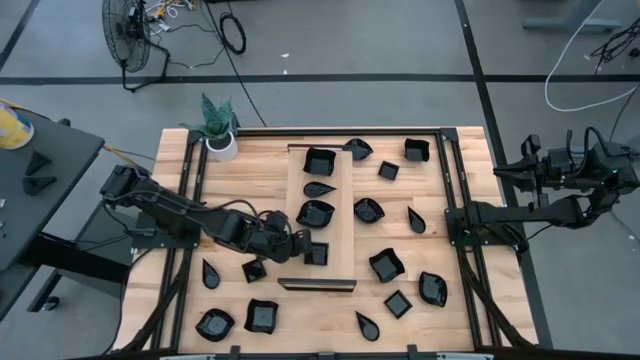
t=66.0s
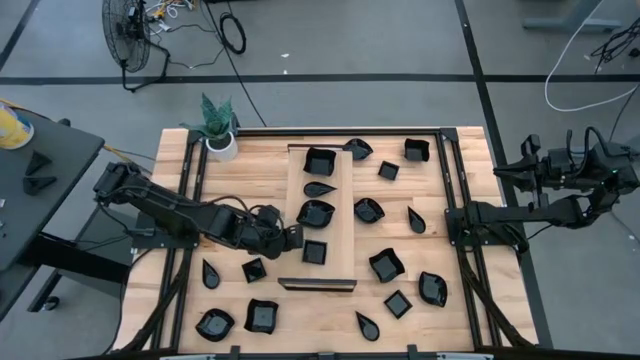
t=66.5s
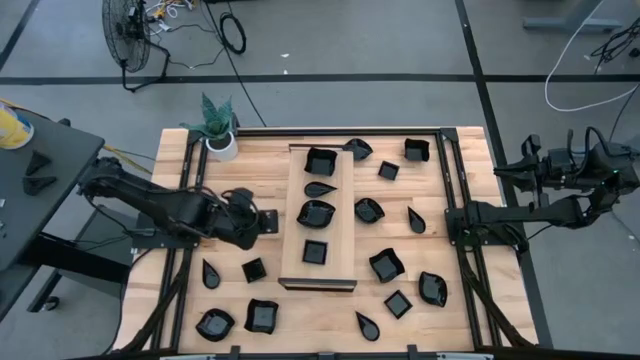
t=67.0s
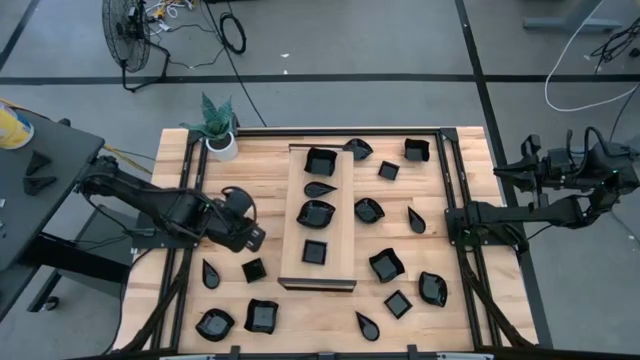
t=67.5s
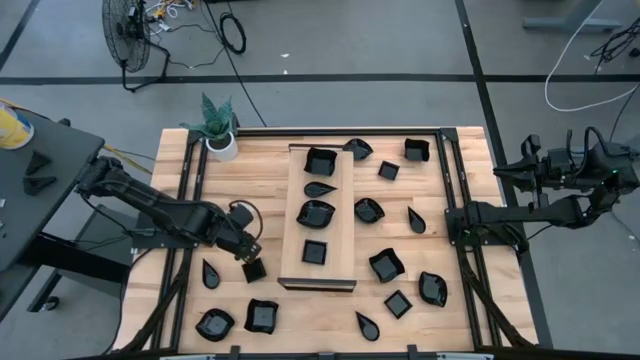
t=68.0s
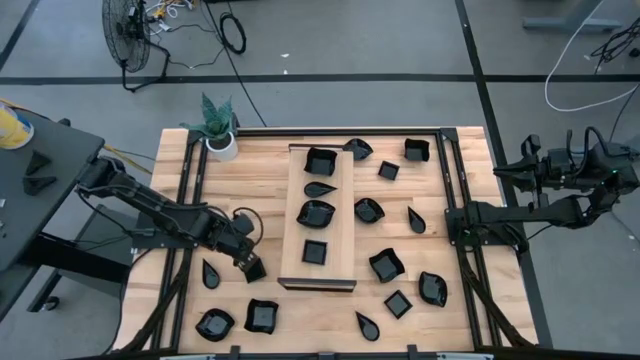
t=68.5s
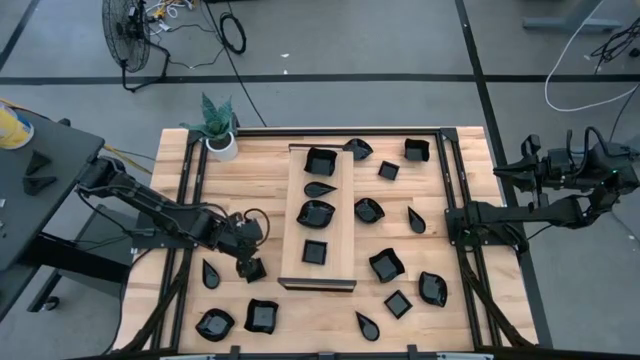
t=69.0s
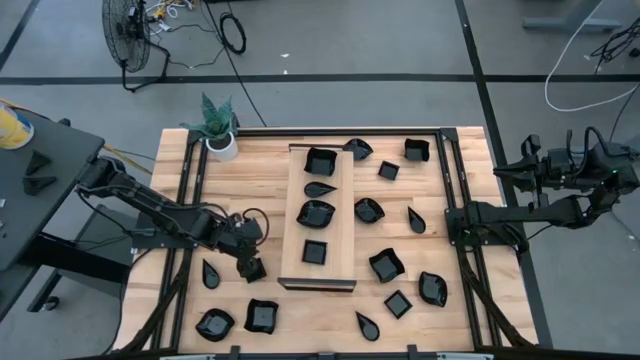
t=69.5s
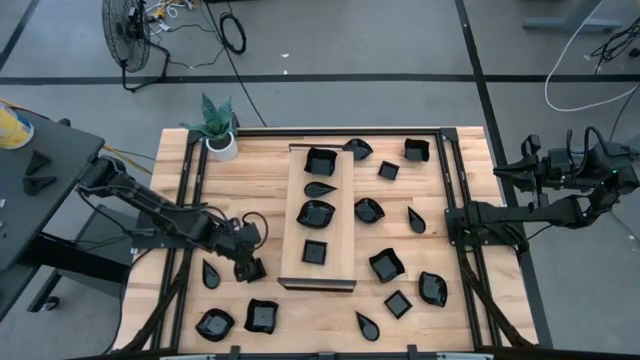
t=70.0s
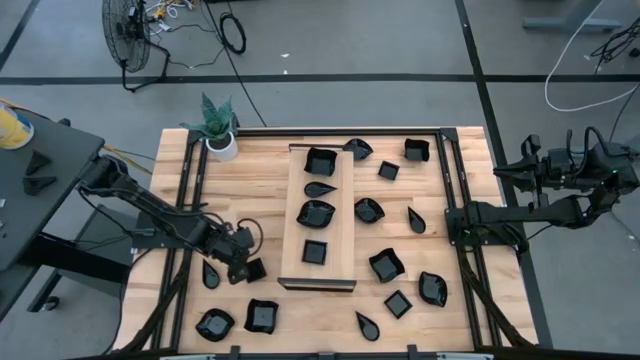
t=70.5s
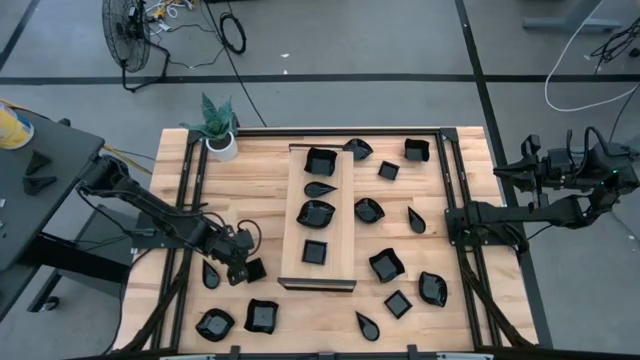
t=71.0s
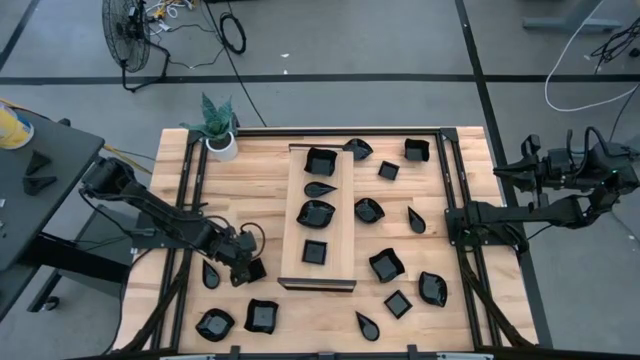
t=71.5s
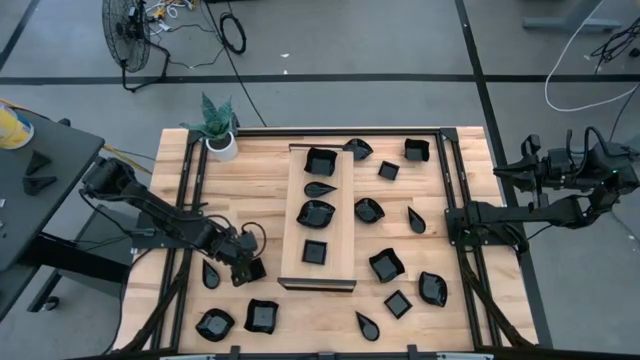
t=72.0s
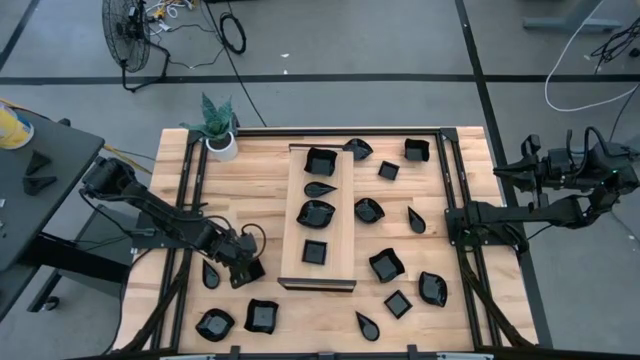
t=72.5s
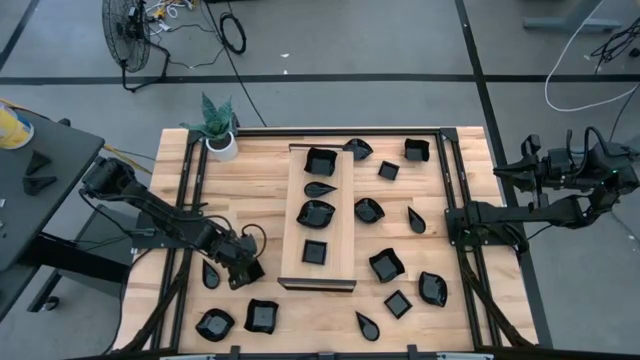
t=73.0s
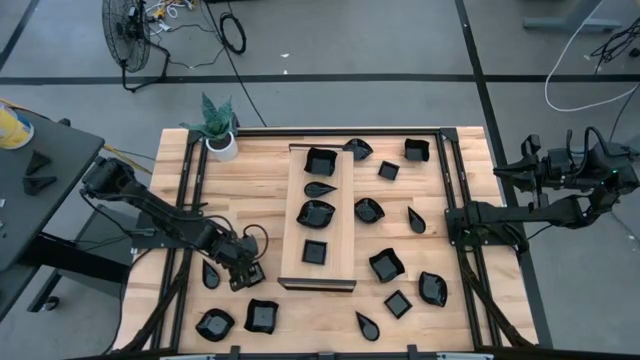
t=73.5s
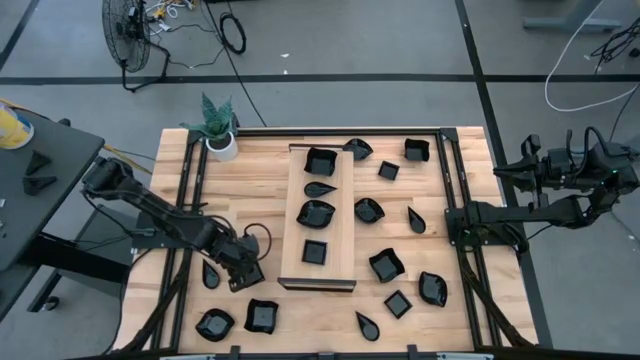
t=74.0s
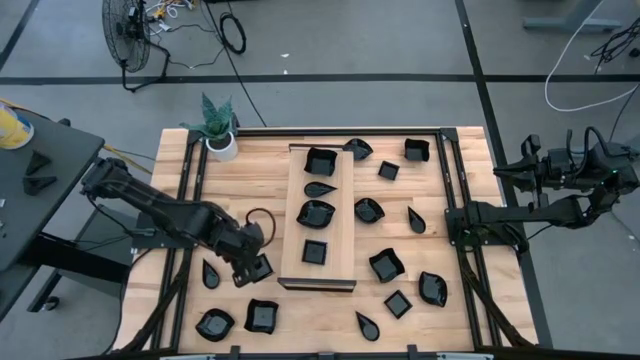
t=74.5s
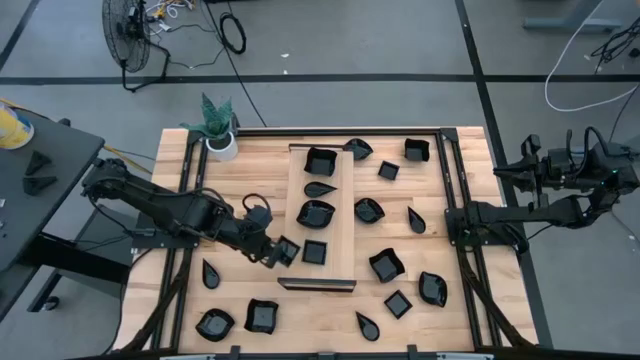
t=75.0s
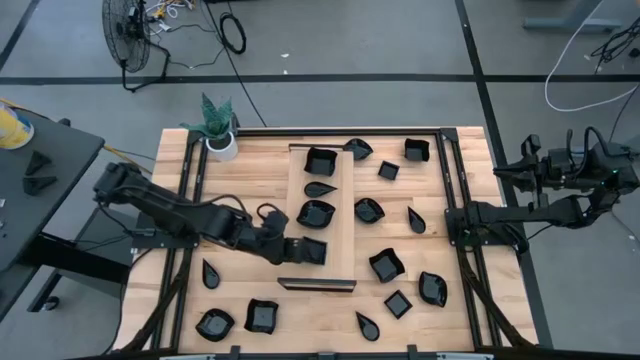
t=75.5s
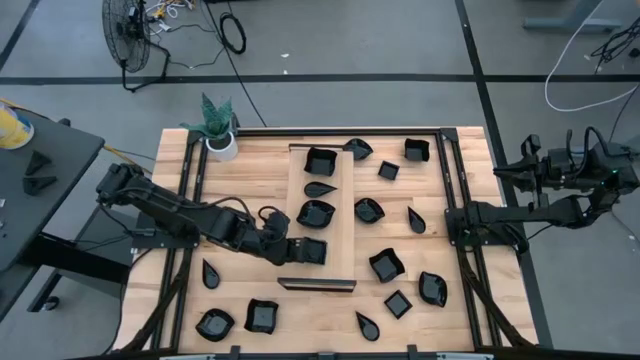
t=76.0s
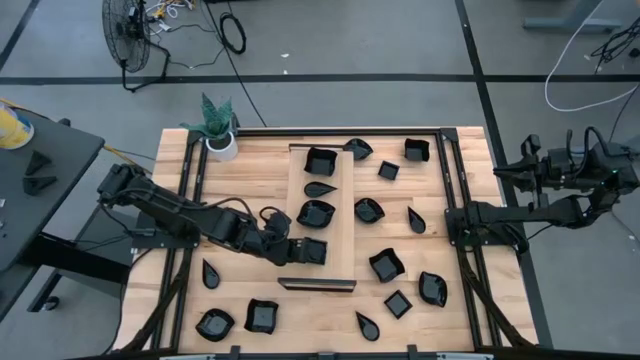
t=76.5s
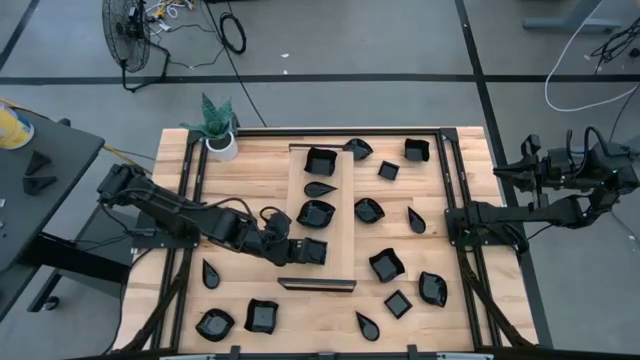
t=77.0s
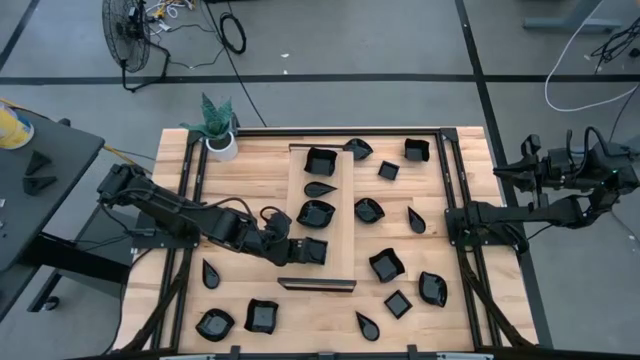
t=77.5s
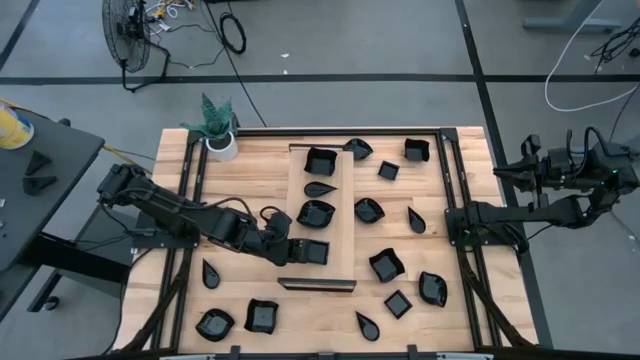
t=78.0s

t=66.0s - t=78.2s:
Task: Pick & Place Mini shaped plates
Stack the square plate on top of the square plate on the shelf

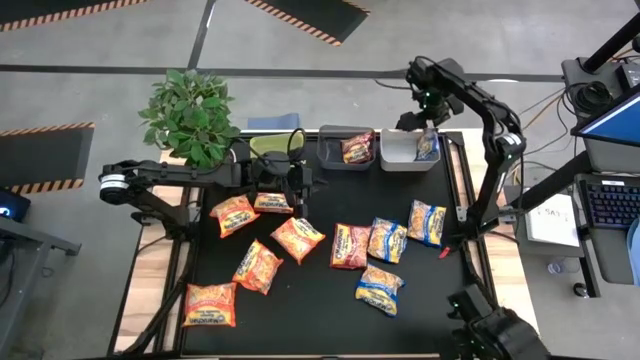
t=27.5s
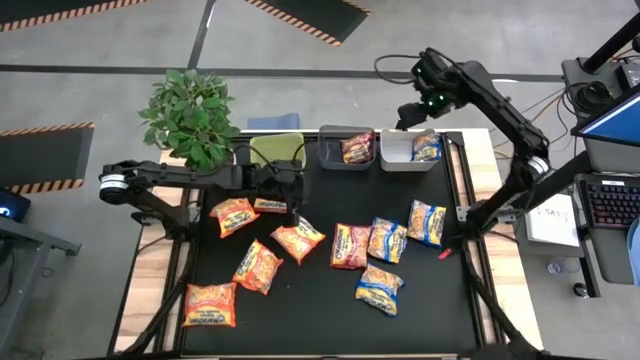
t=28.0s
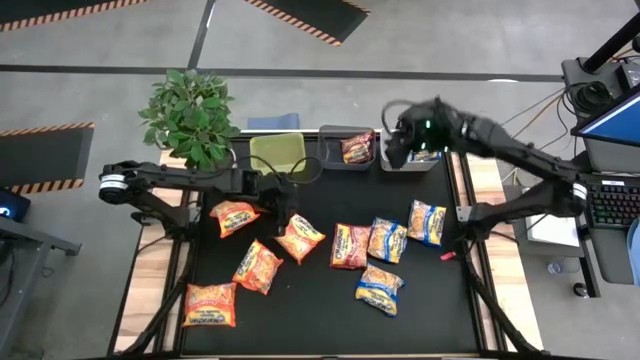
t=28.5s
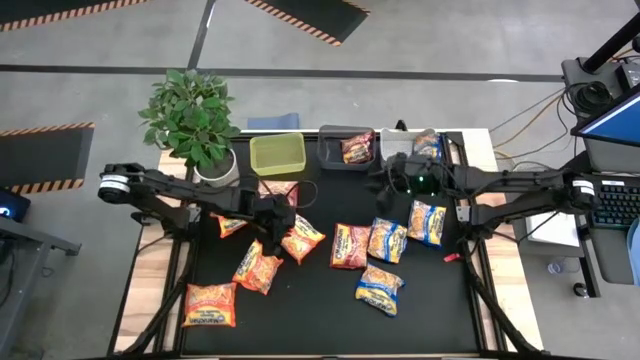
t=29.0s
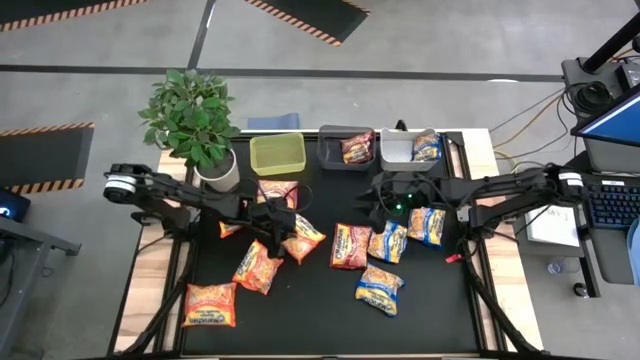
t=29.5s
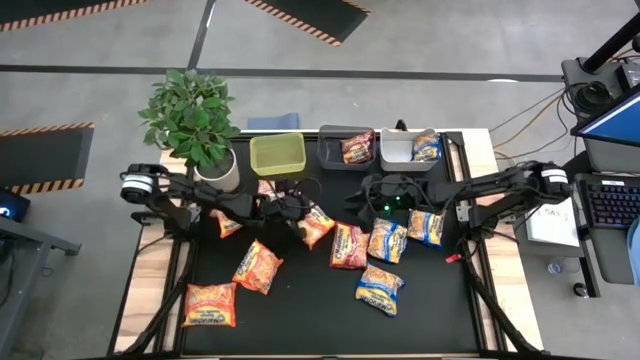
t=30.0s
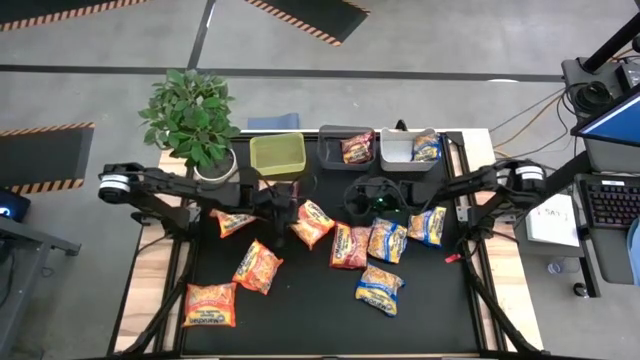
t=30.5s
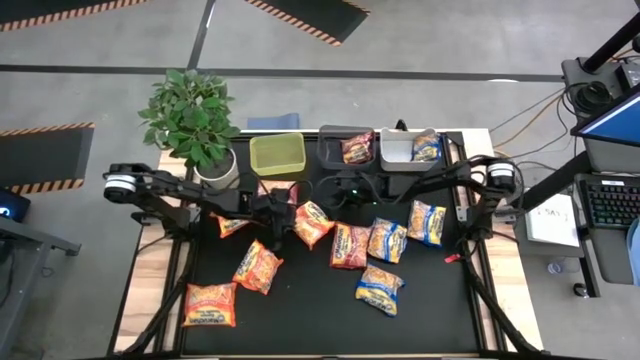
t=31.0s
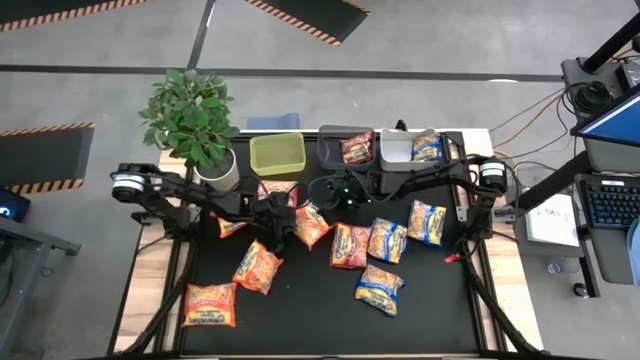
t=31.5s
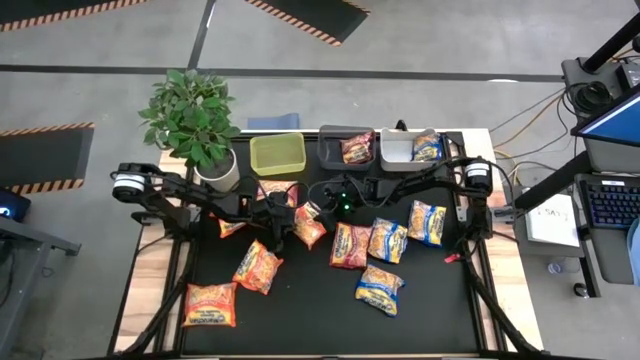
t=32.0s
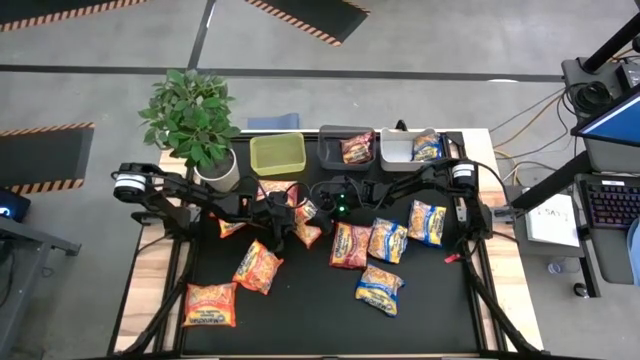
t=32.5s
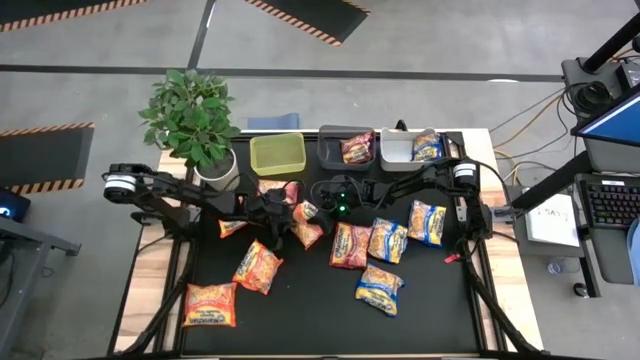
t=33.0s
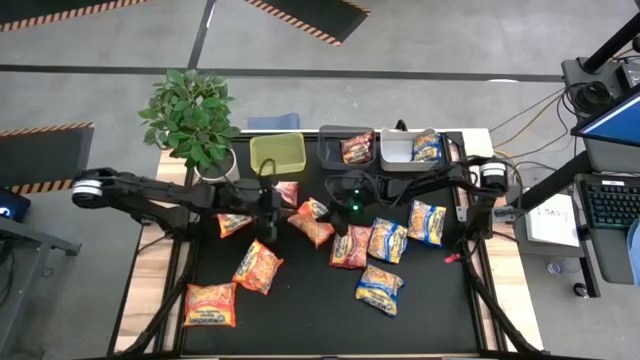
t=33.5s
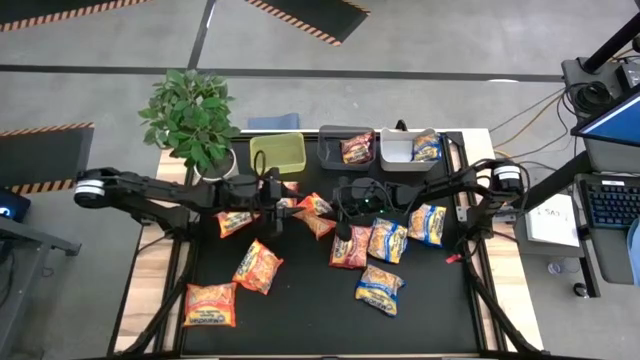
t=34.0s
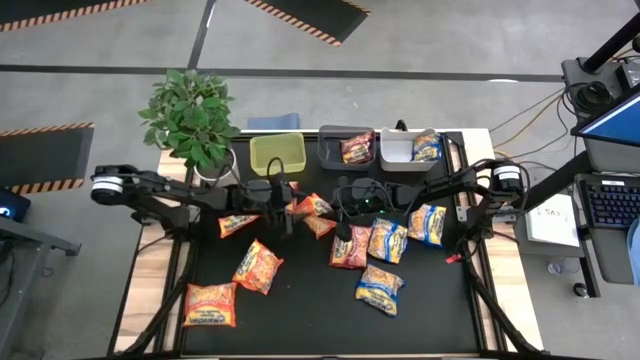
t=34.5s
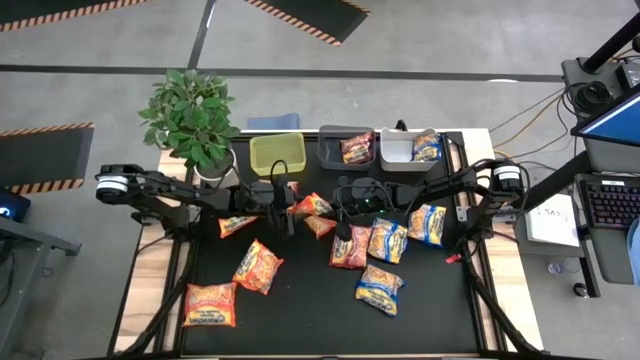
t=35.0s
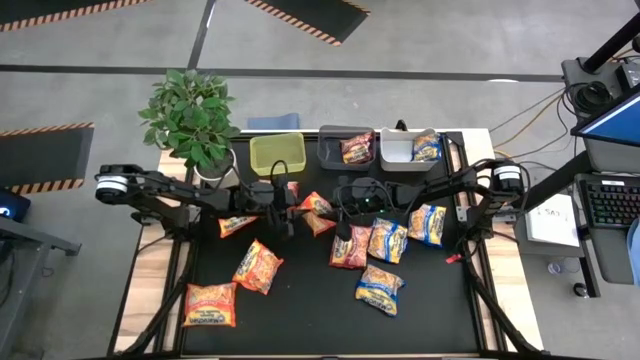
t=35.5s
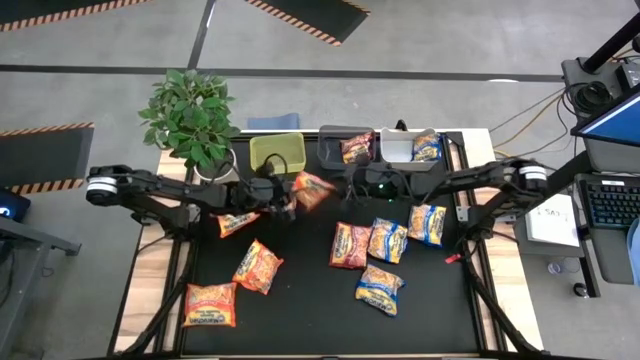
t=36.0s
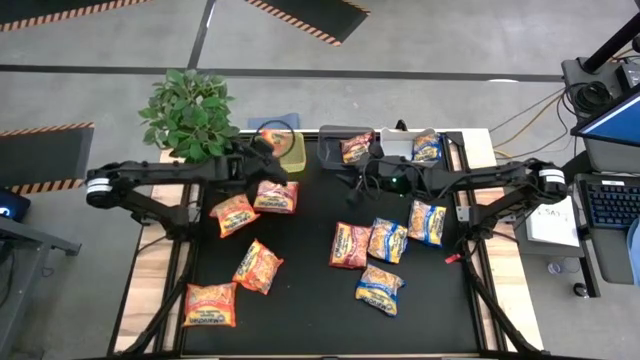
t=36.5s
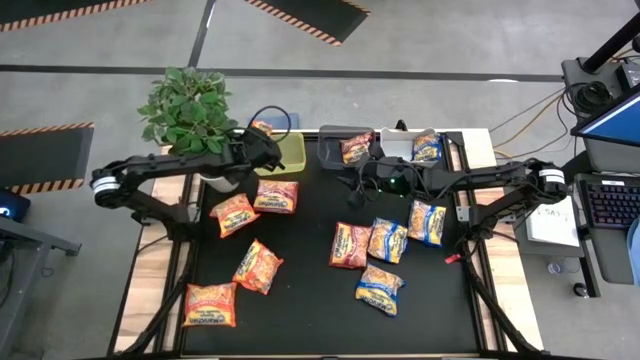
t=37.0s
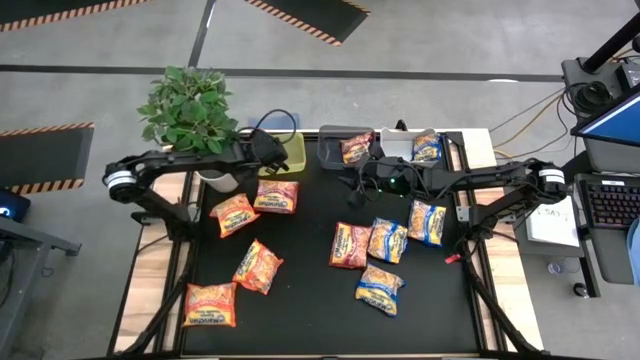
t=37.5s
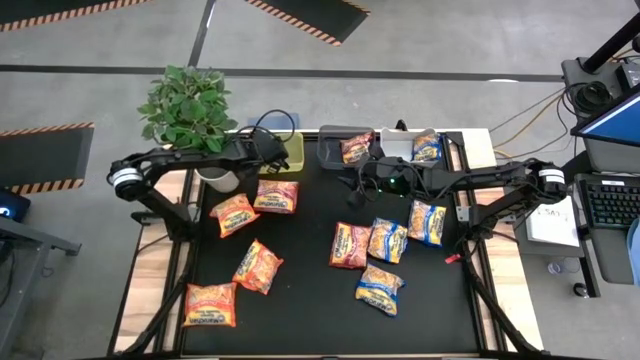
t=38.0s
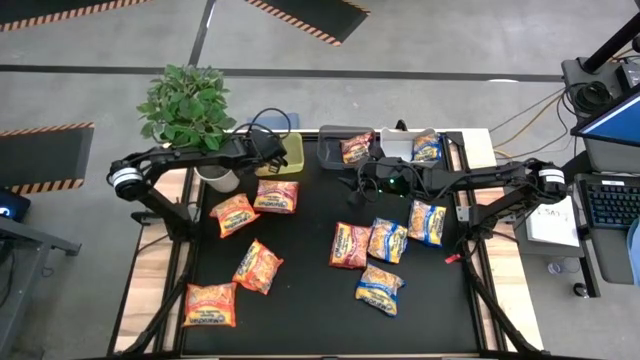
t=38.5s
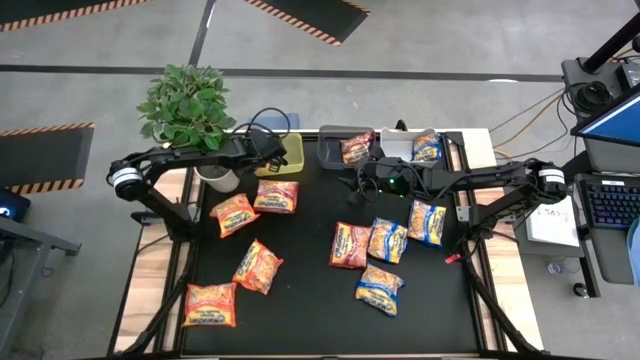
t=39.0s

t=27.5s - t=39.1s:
Task: Sort Maruchan noodles
Put the orange noodle pack into the yellow bin
